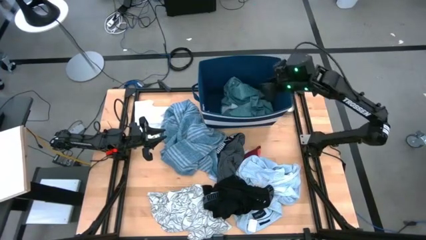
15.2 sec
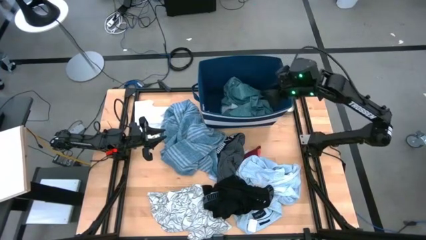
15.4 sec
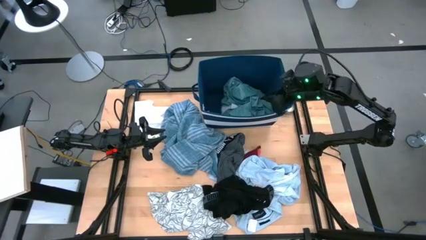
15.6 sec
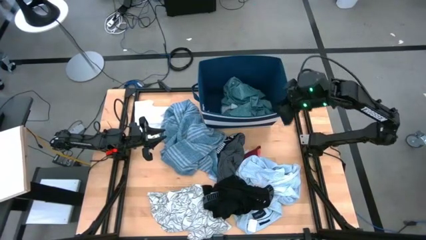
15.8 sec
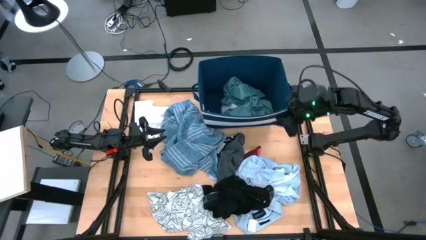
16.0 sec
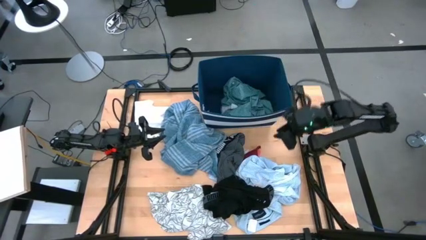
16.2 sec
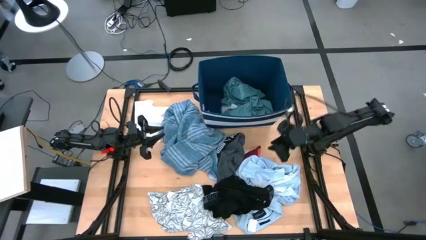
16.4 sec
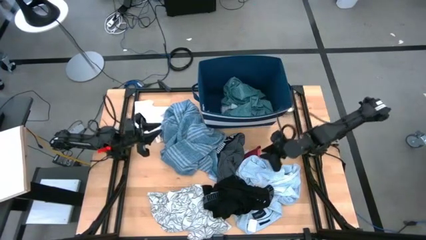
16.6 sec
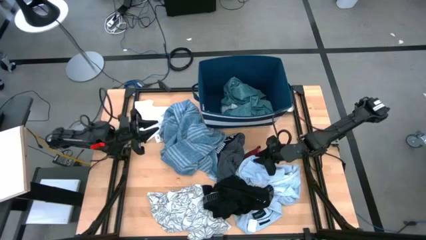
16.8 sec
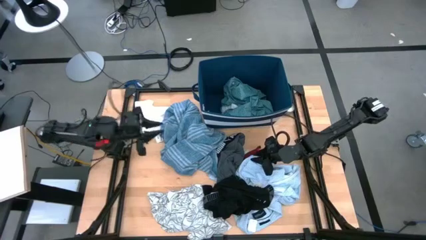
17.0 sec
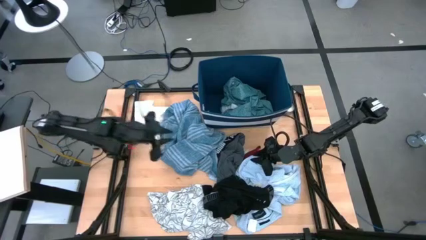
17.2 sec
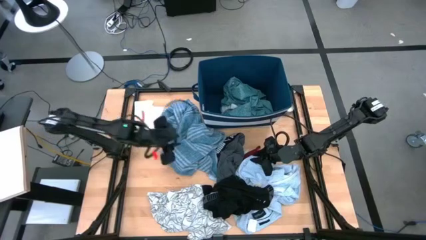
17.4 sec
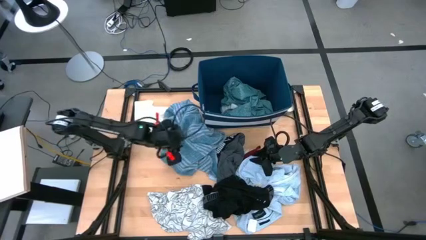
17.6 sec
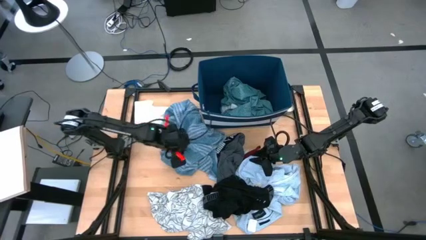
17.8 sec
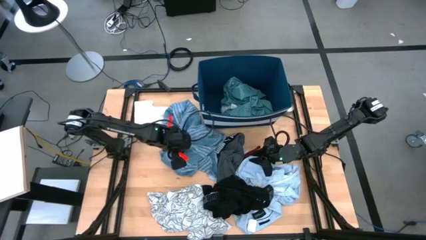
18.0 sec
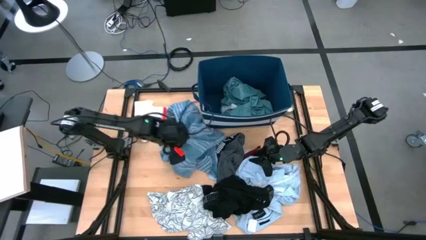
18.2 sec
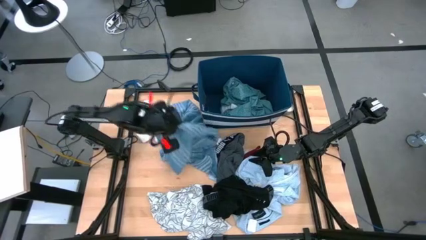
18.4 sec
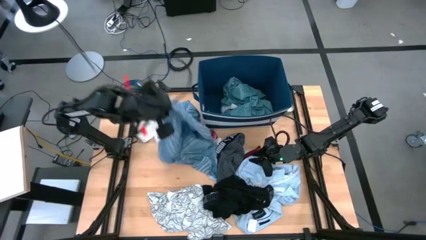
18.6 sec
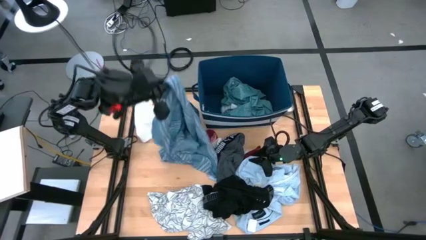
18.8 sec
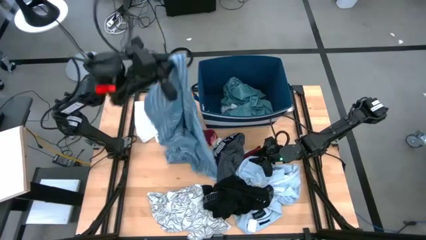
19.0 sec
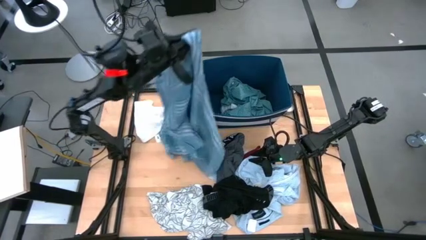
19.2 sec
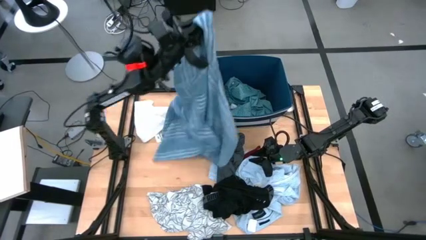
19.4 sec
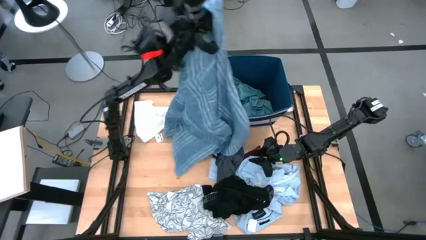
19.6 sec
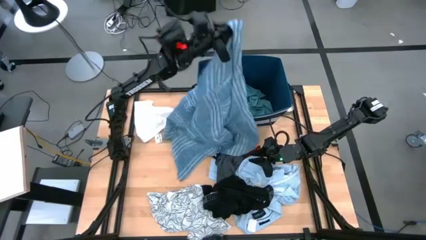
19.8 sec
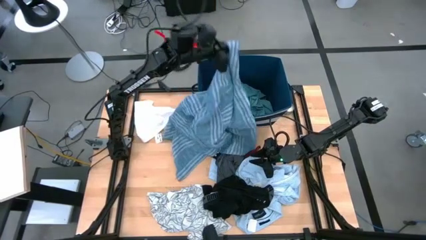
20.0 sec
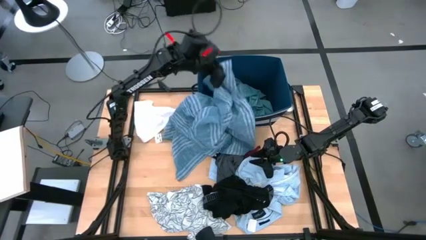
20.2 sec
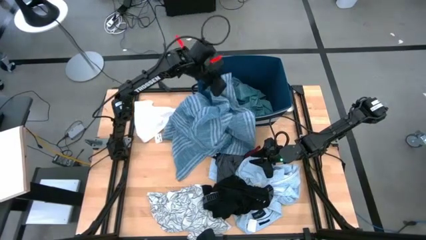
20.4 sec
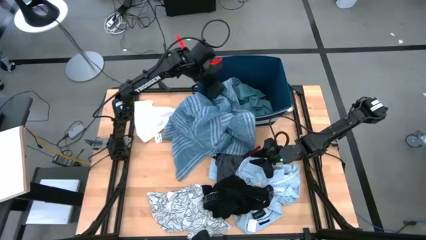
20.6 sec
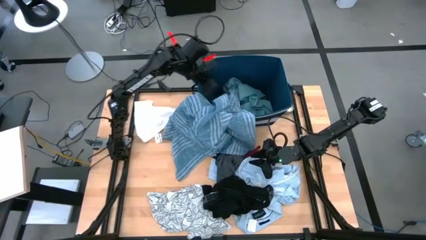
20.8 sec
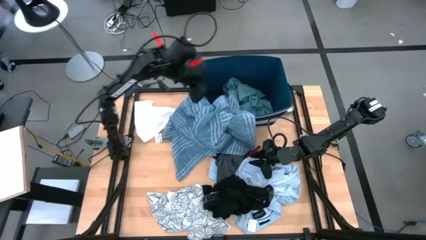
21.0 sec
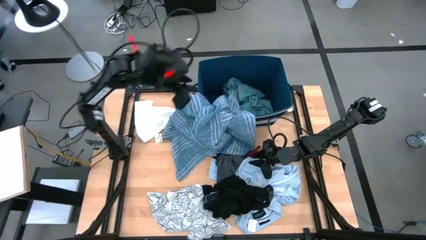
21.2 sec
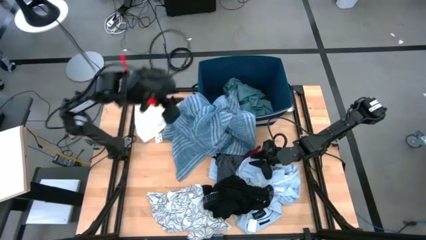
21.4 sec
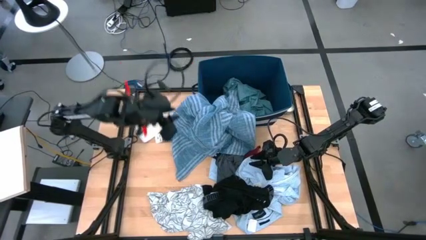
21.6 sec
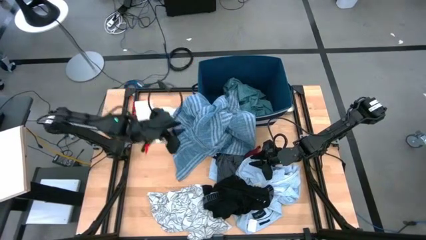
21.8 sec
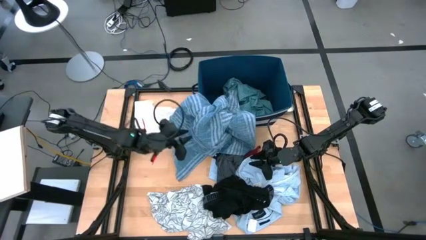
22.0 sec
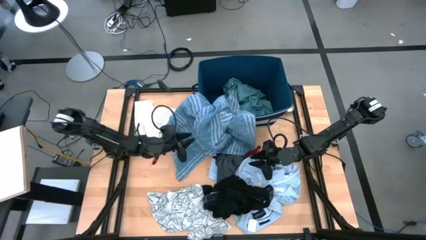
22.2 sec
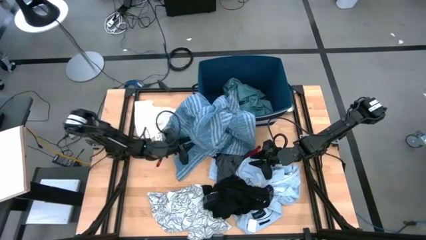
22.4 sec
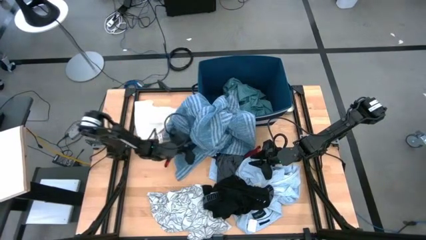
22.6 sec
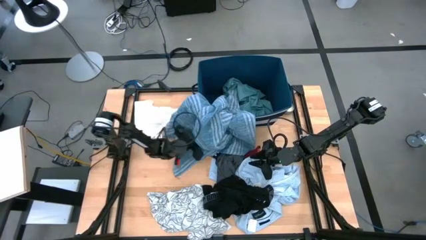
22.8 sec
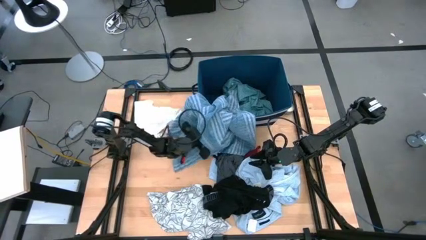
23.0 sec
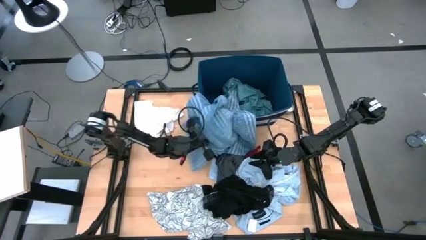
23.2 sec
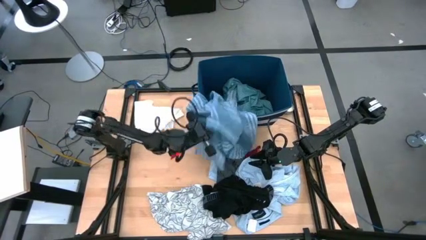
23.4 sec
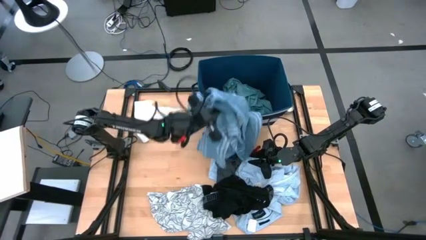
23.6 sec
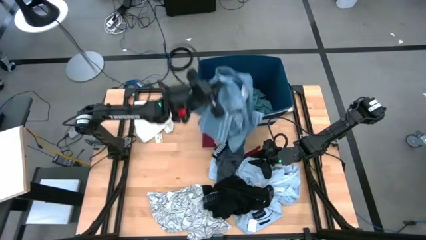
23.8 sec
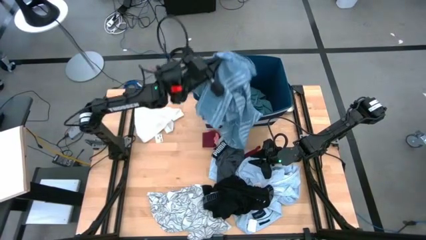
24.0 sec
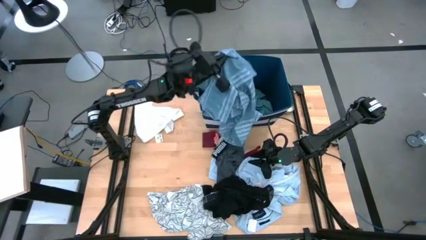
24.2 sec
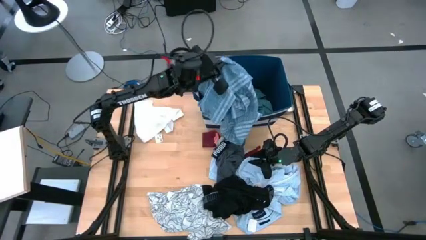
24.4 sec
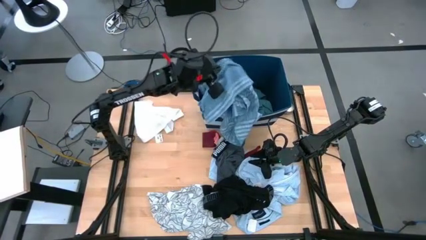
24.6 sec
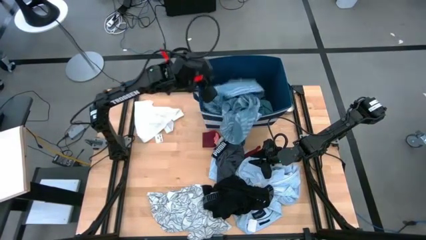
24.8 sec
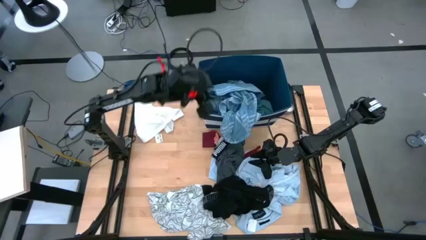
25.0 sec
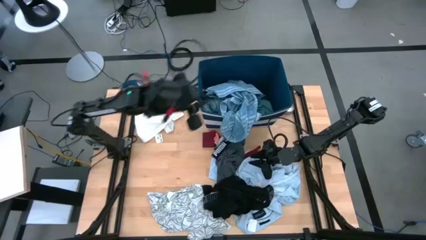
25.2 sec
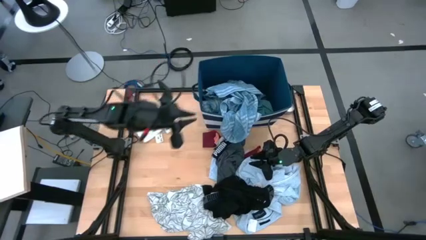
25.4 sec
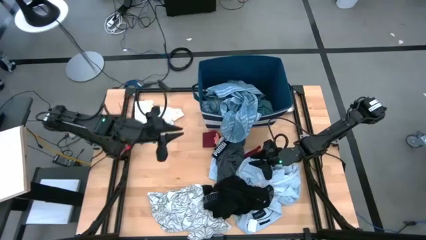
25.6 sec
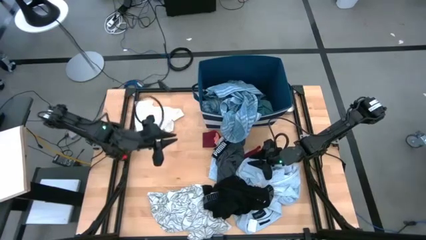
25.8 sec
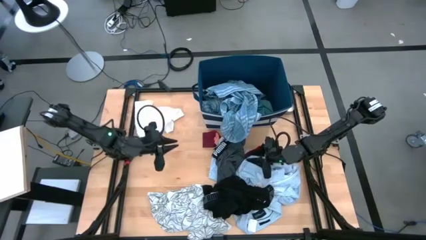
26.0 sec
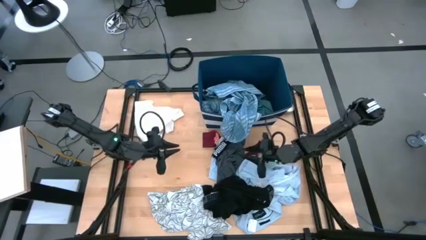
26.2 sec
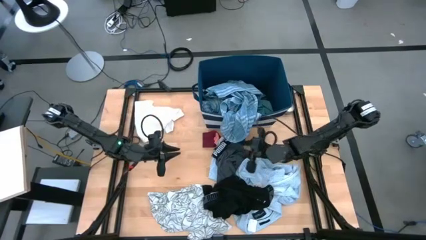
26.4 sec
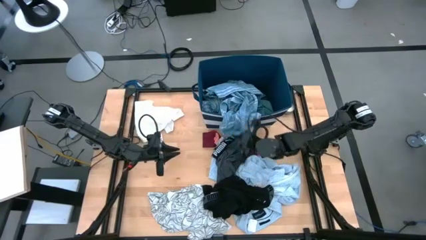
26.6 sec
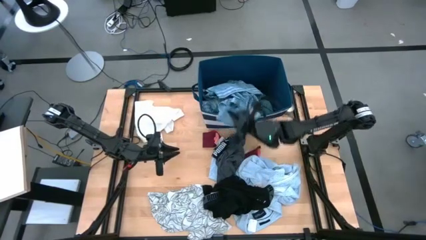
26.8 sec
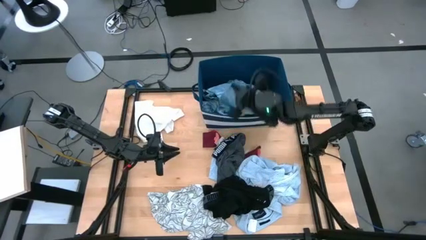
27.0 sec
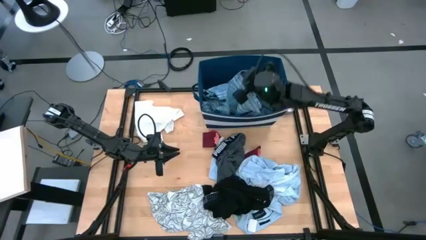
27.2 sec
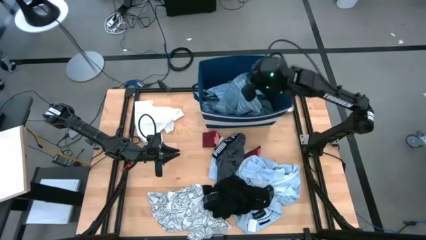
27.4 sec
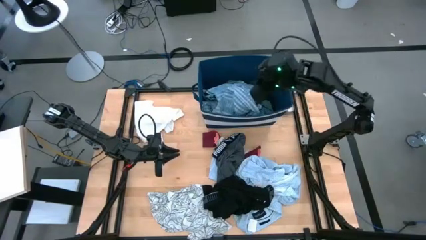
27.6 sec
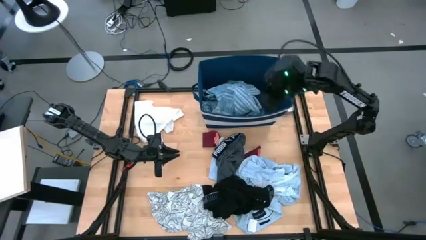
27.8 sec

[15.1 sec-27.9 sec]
Task: Sort clothes
Put the blue cloth into the blue bin

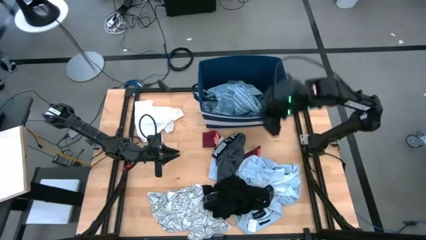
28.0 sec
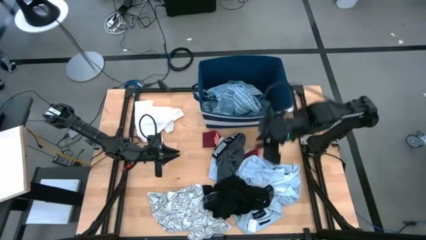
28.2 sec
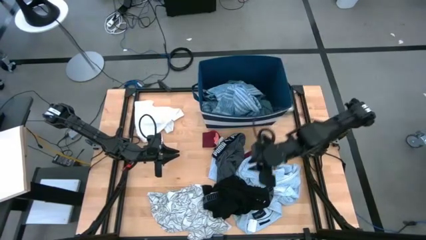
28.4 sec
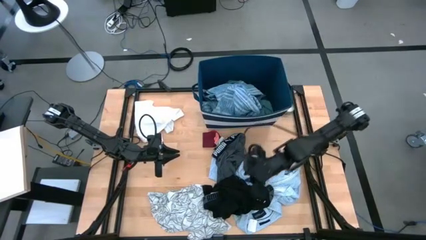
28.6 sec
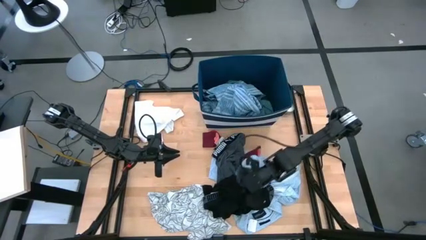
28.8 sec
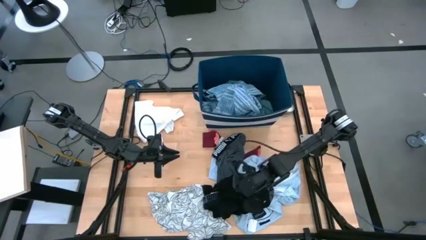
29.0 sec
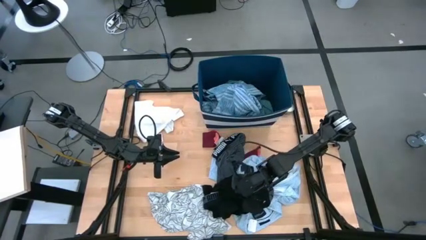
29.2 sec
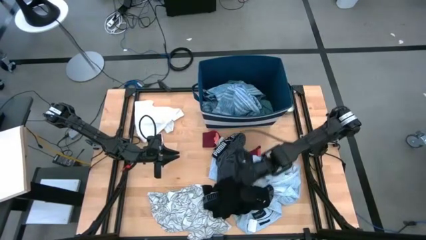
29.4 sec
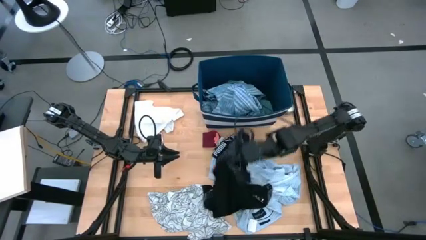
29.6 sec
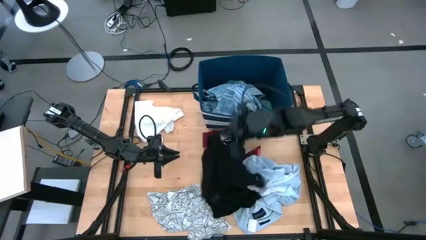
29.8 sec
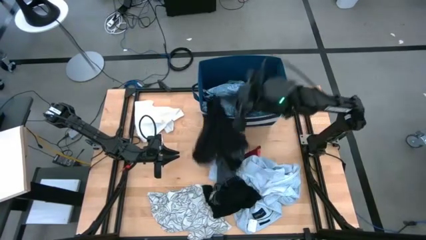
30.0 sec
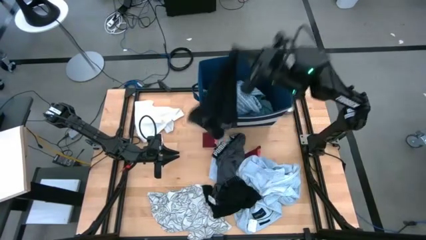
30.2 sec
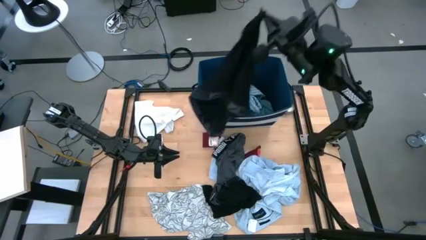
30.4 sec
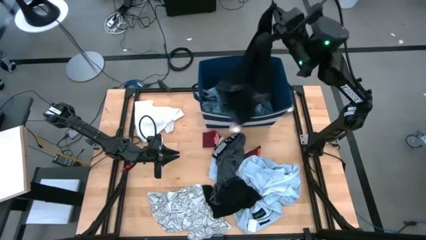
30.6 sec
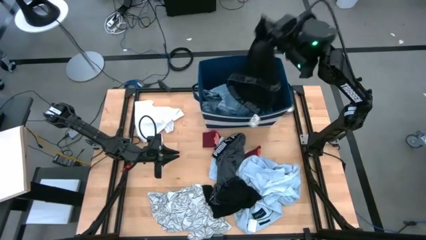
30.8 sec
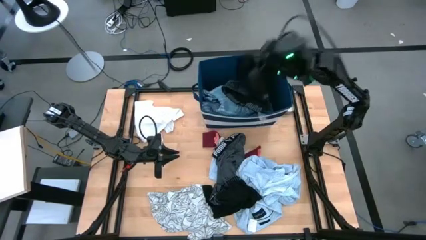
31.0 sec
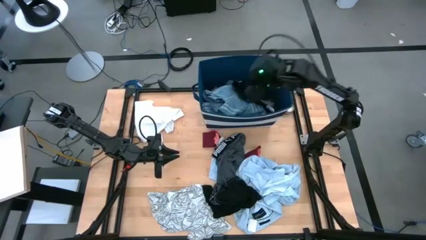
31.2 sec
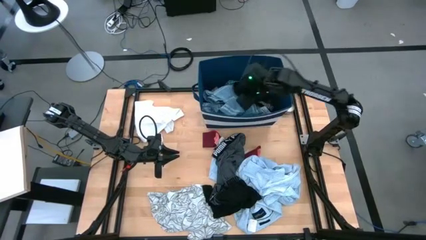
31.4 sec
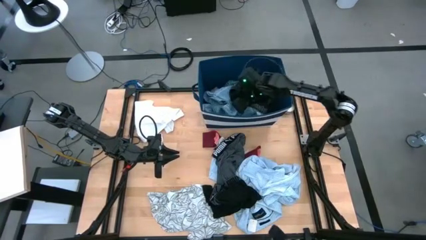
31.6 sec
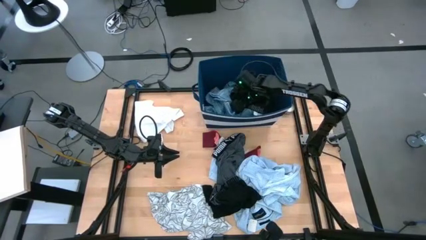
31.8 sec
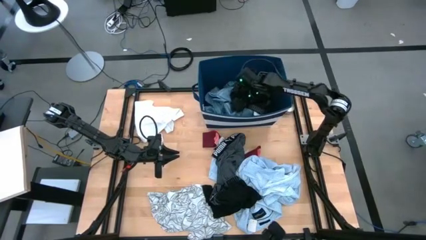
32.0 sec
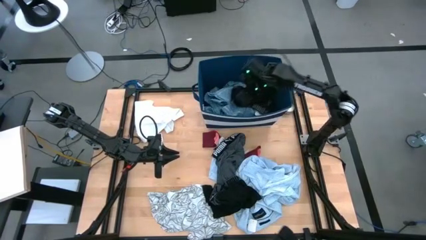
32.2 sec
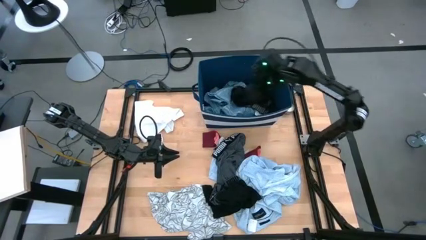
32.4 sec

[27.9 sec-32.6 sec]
Put the black boxer into the blue bin
